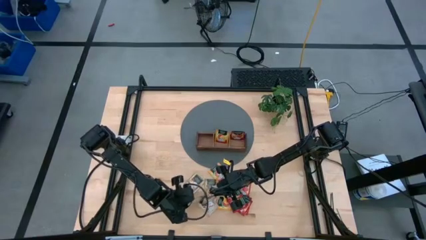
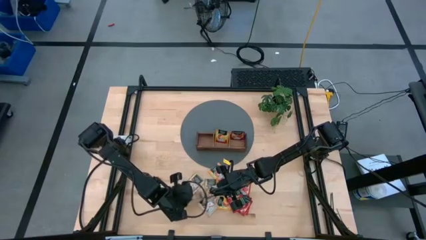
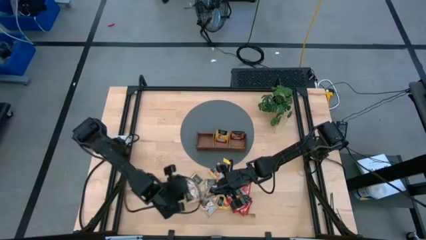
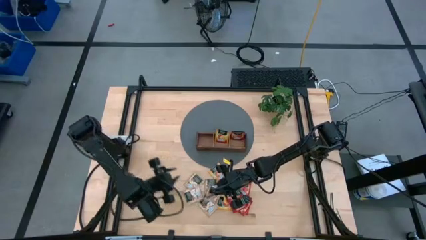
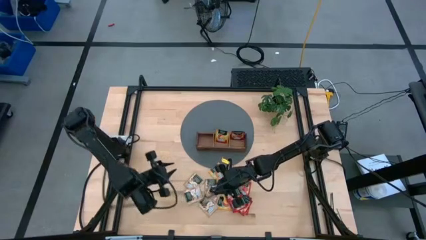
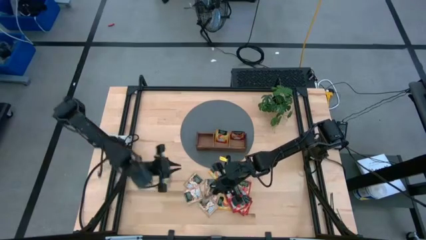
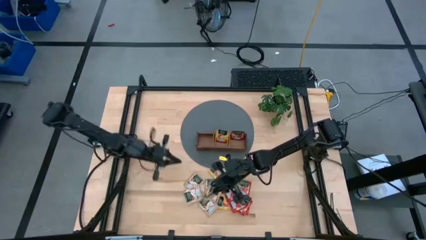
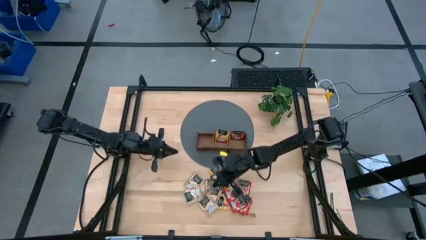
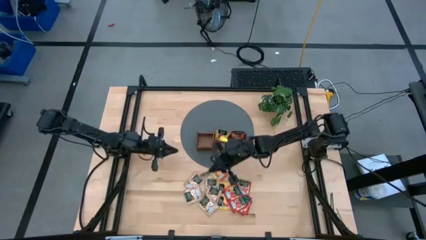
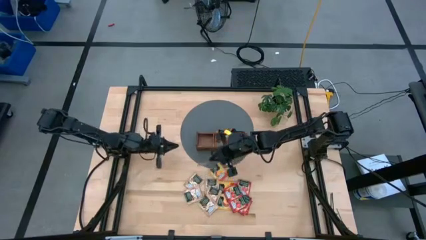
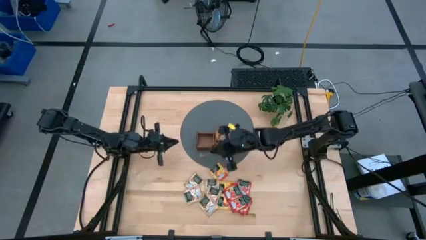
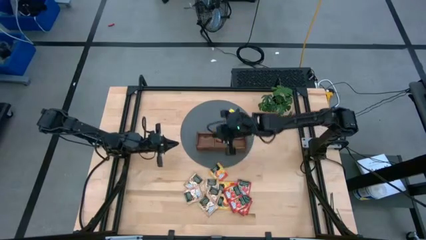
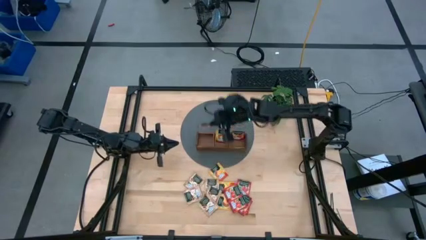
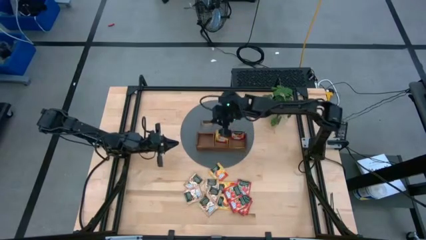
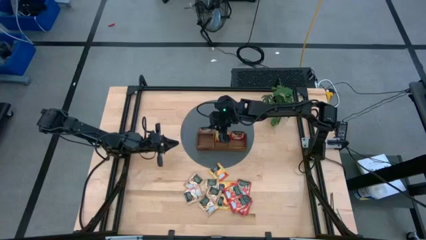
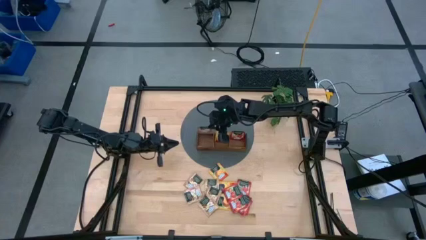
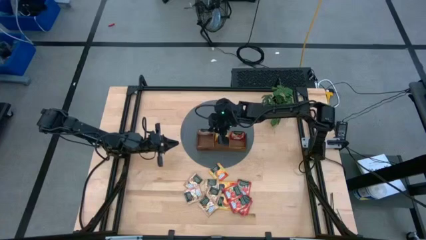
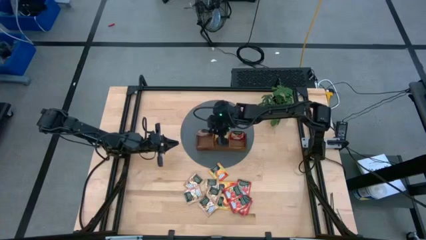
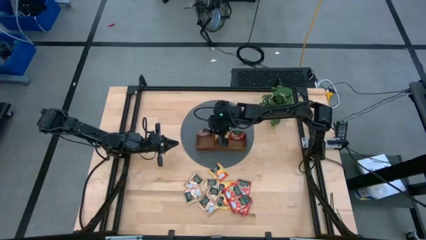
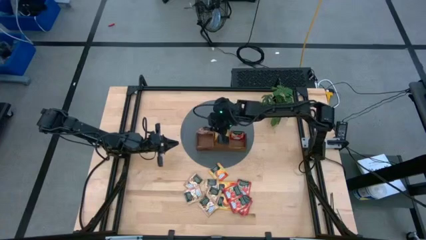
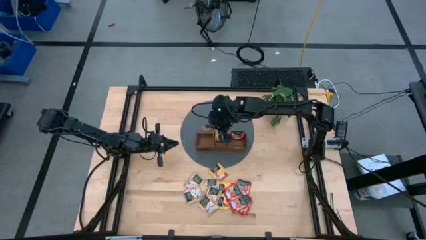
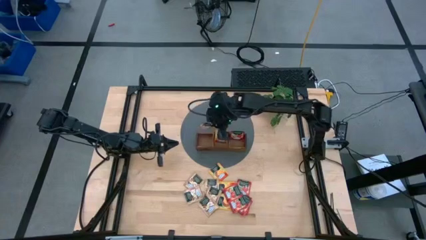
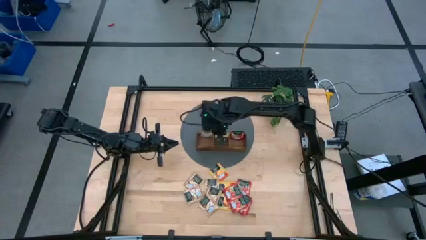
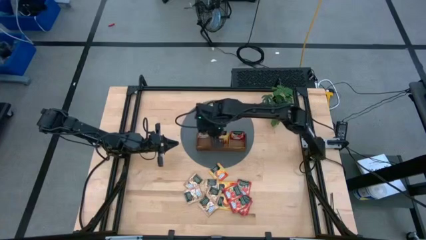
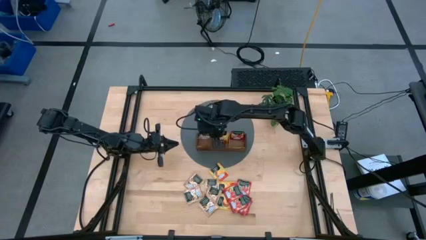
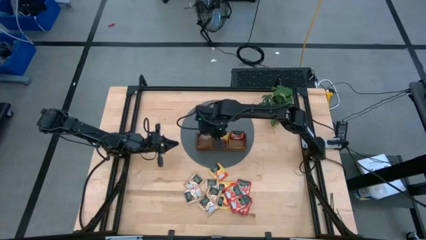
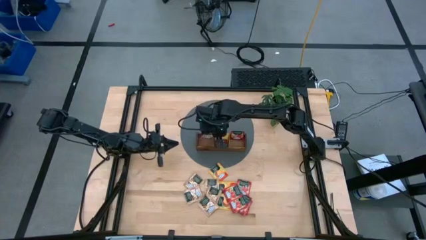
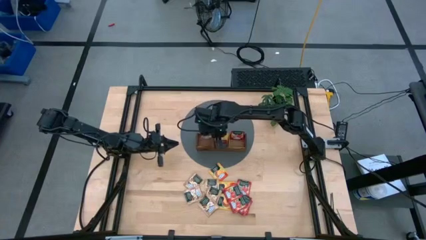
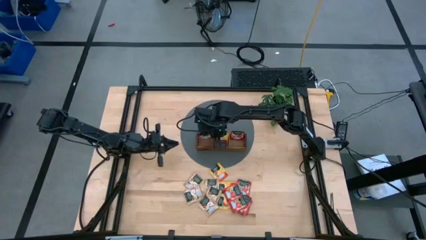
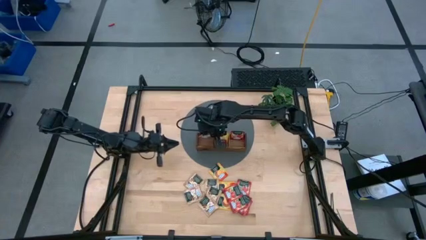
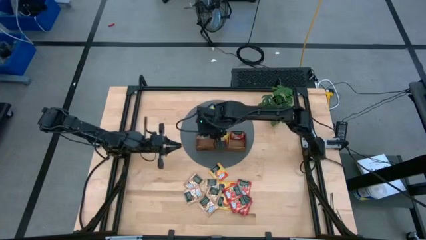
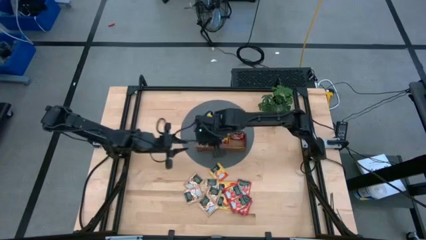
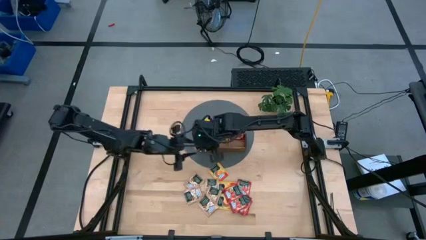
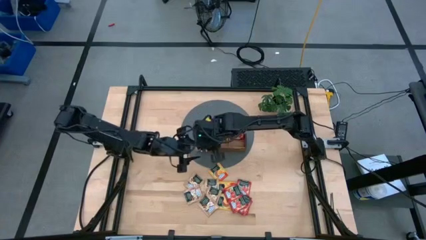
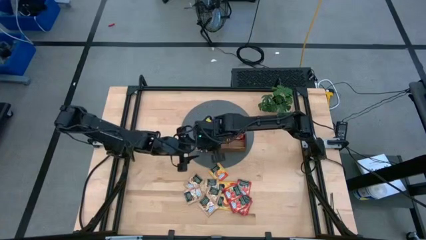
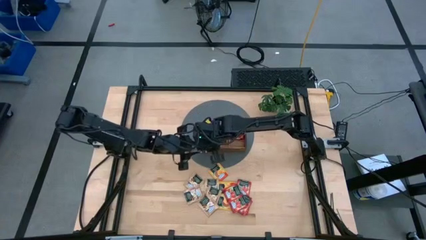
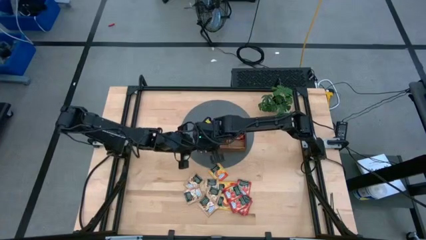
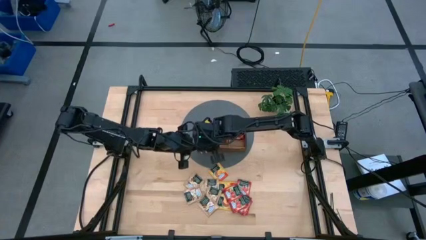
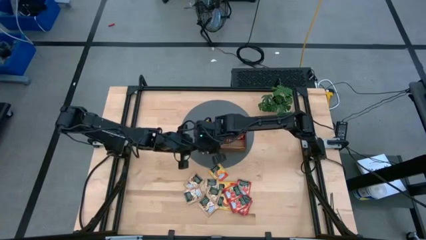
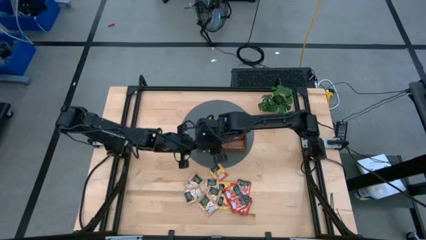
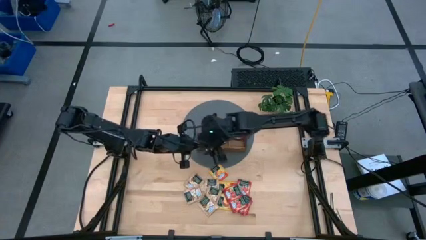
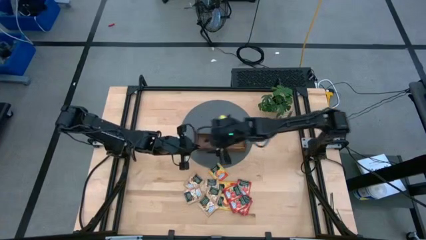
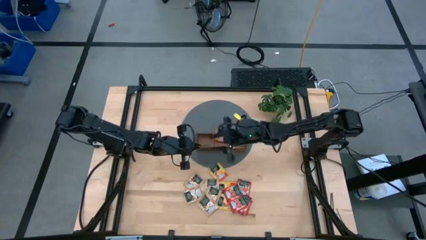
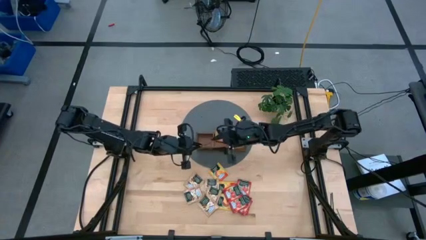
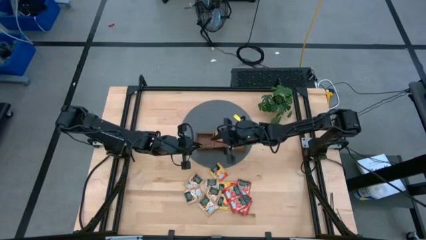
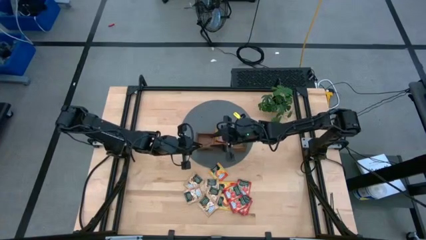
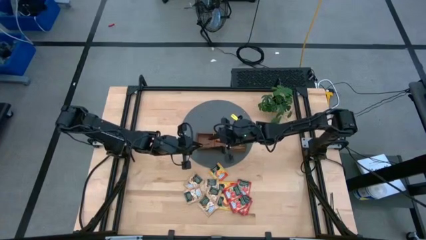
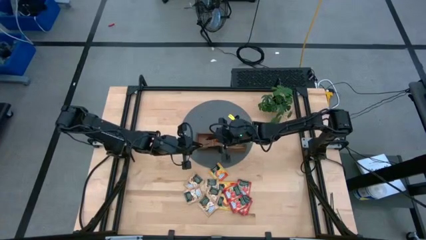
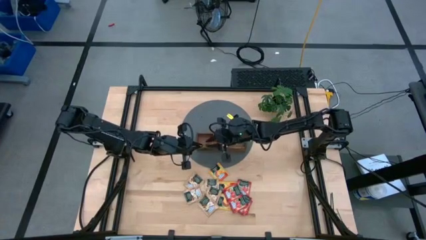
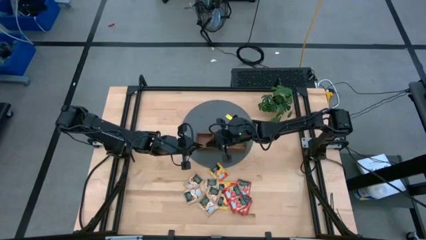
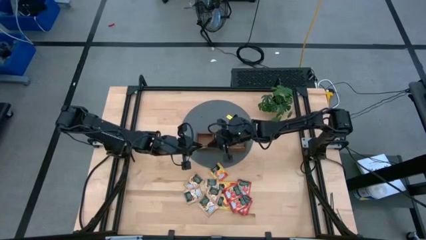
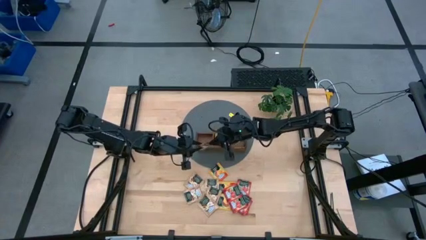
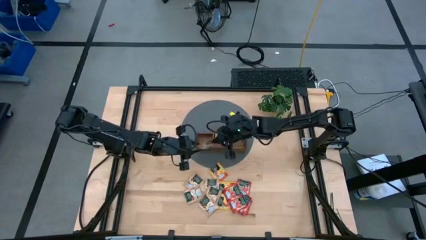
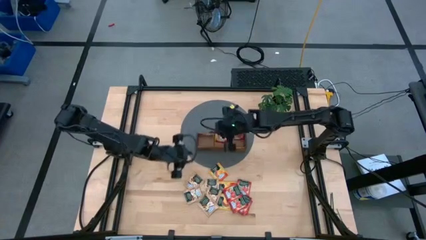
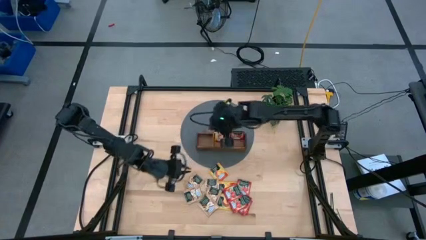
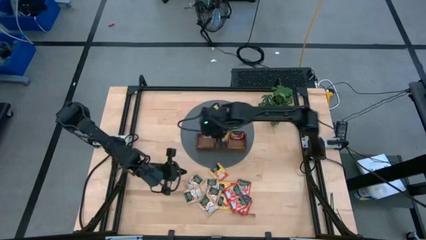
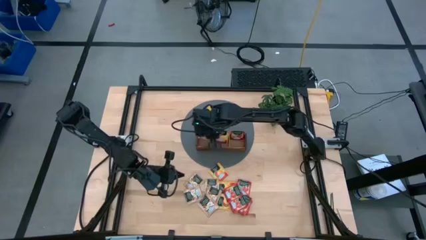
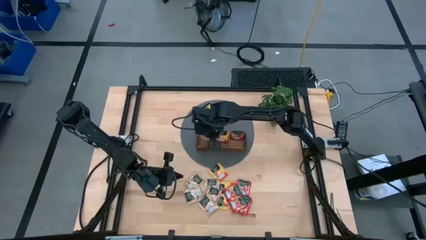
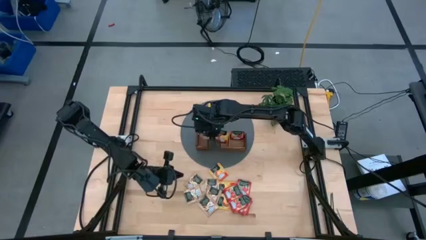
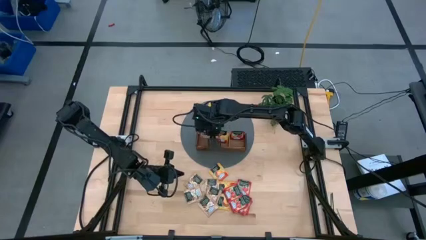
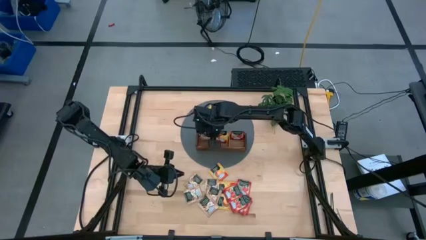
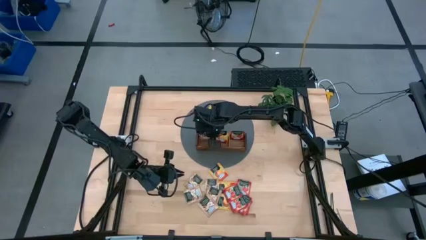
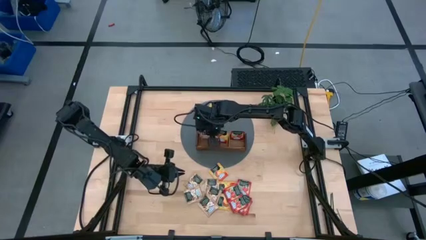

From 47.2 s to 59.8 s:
Task: Pick & Place Tea
Put the brown tea bag into the left section of the wooden organizer
